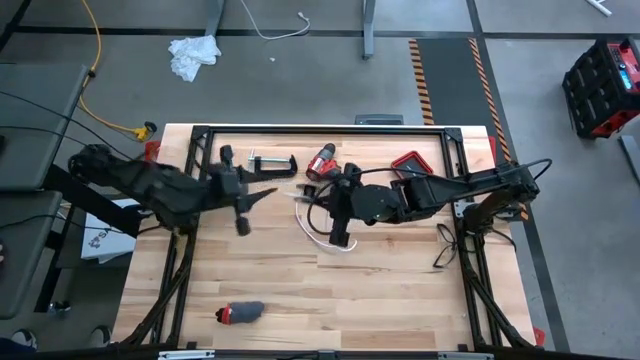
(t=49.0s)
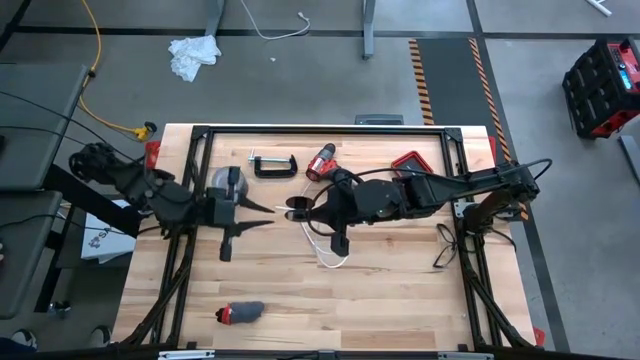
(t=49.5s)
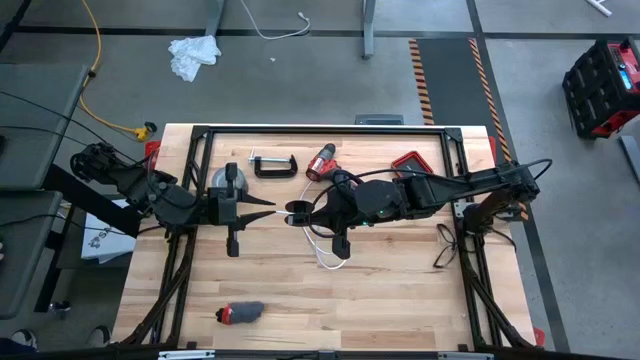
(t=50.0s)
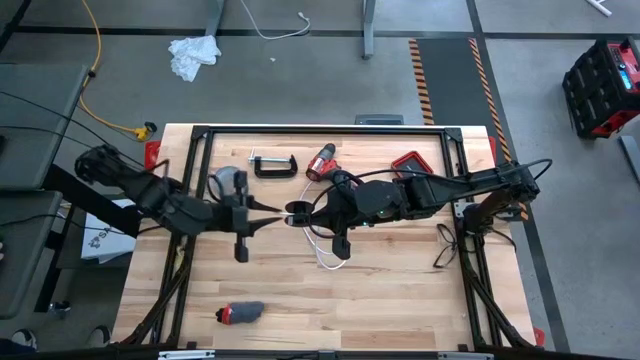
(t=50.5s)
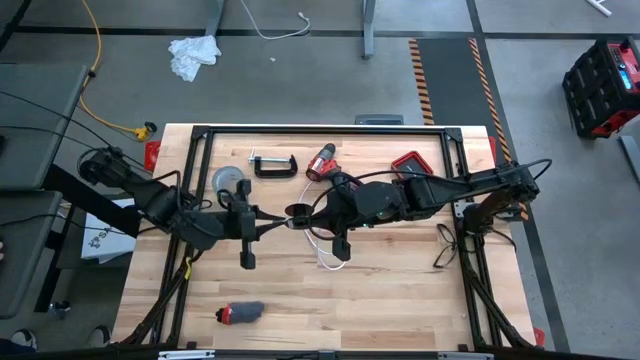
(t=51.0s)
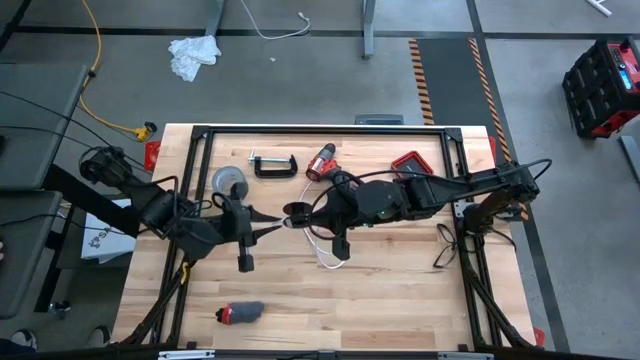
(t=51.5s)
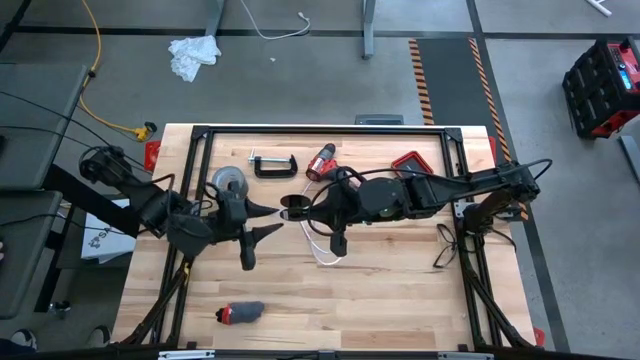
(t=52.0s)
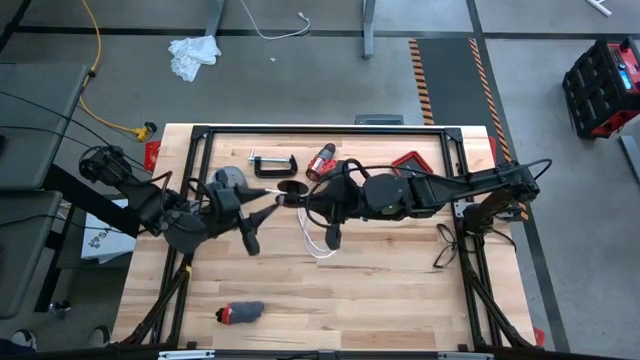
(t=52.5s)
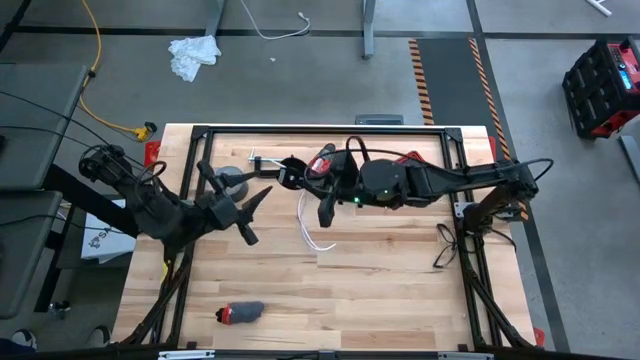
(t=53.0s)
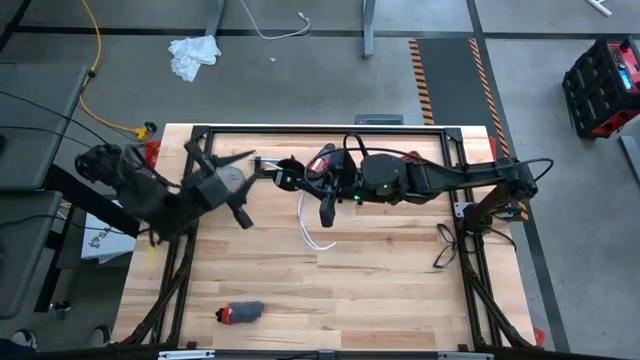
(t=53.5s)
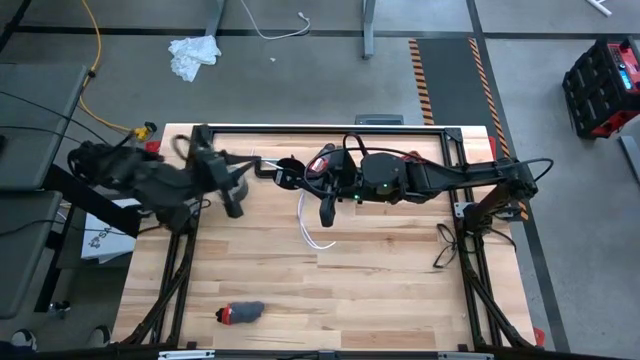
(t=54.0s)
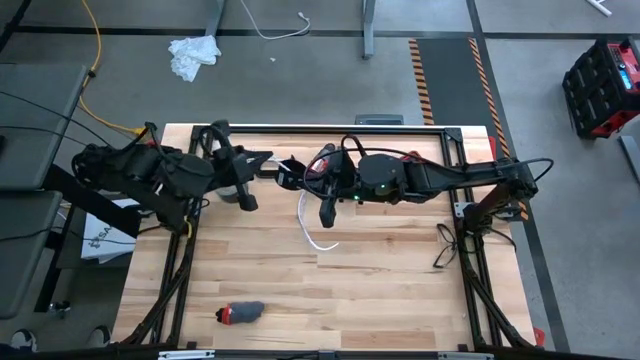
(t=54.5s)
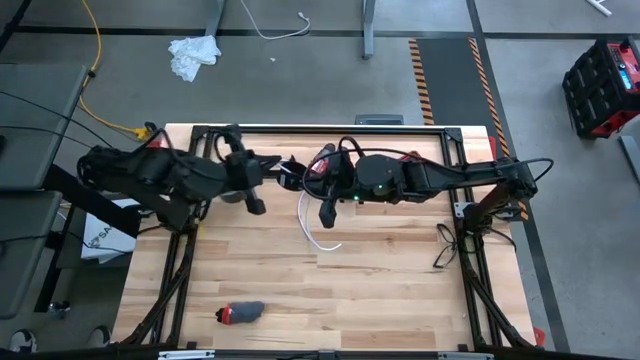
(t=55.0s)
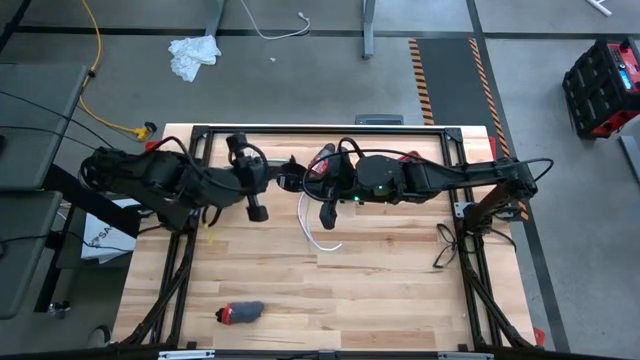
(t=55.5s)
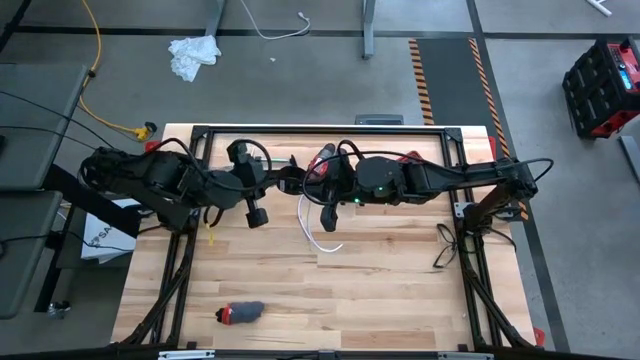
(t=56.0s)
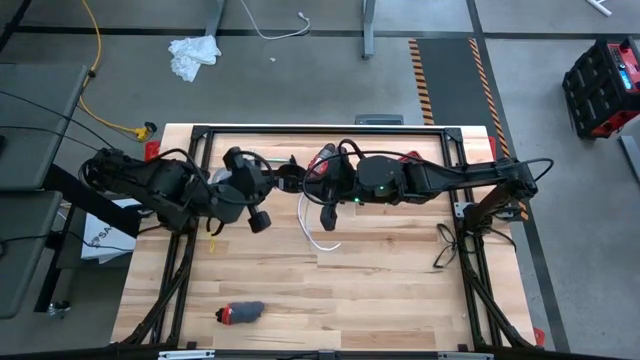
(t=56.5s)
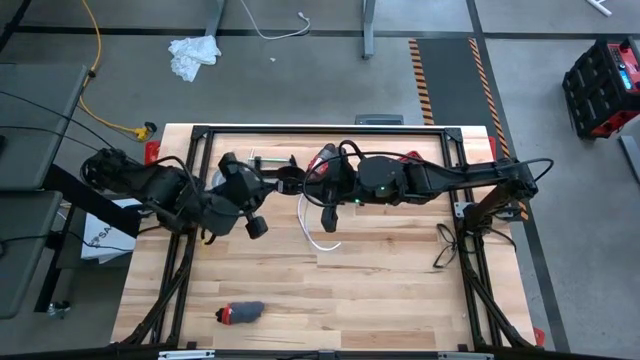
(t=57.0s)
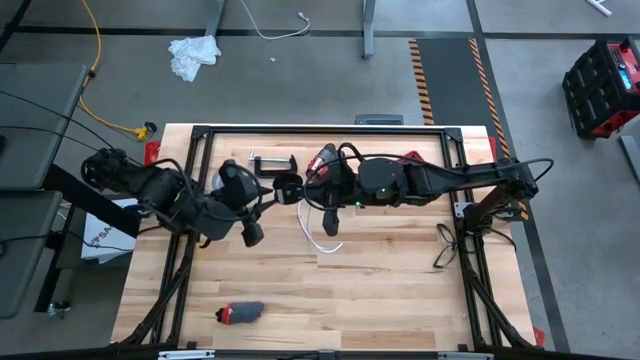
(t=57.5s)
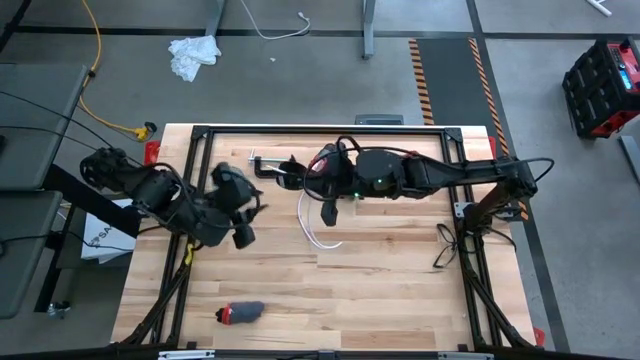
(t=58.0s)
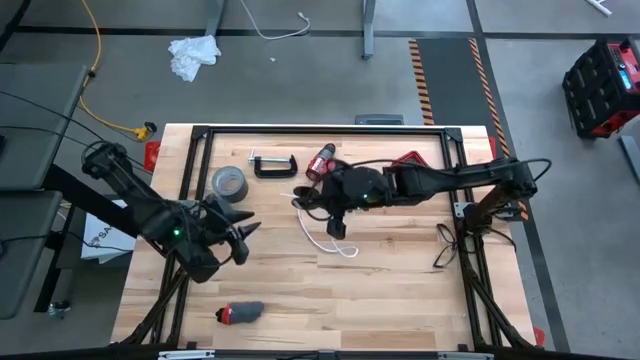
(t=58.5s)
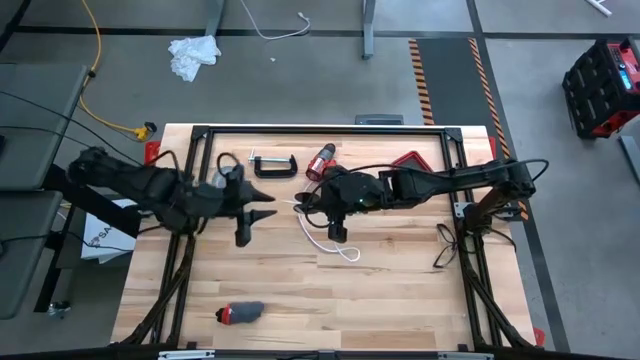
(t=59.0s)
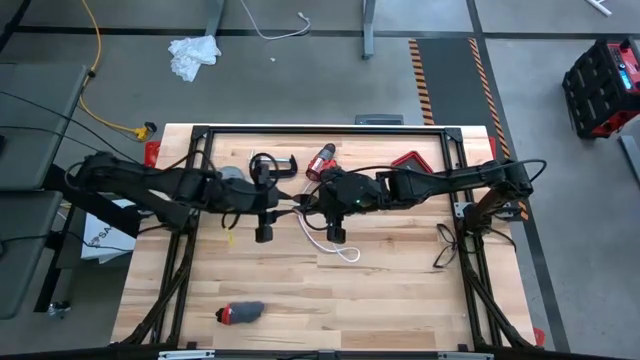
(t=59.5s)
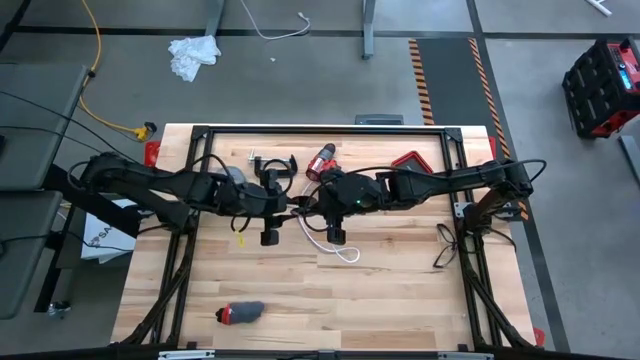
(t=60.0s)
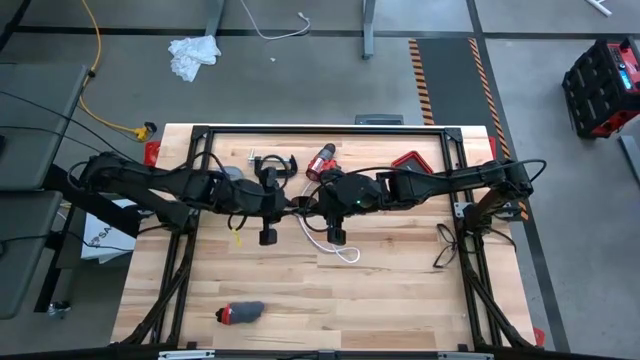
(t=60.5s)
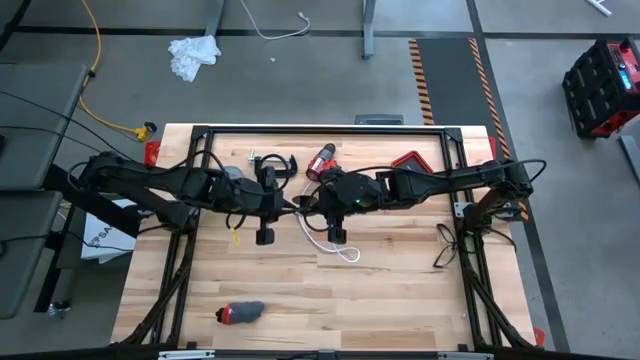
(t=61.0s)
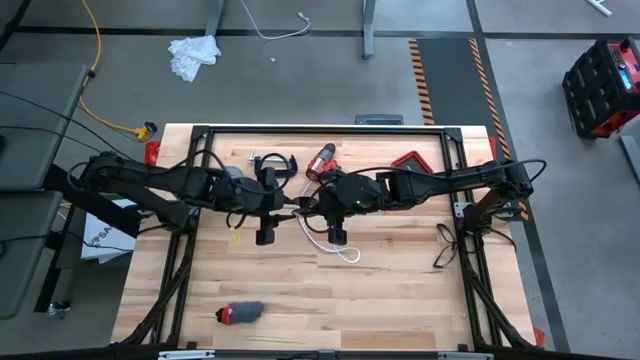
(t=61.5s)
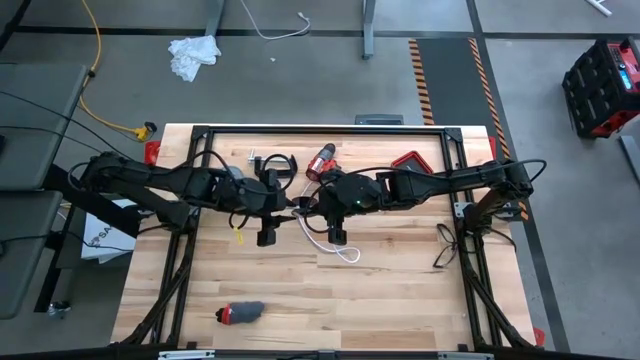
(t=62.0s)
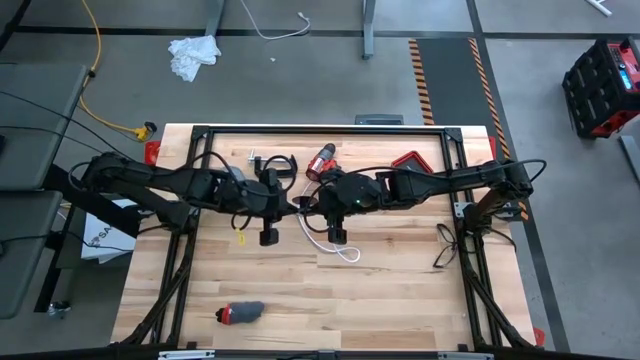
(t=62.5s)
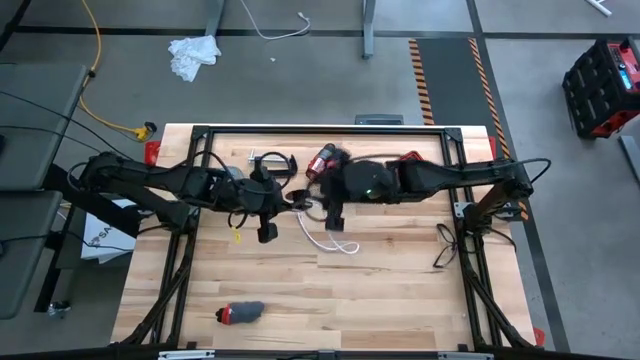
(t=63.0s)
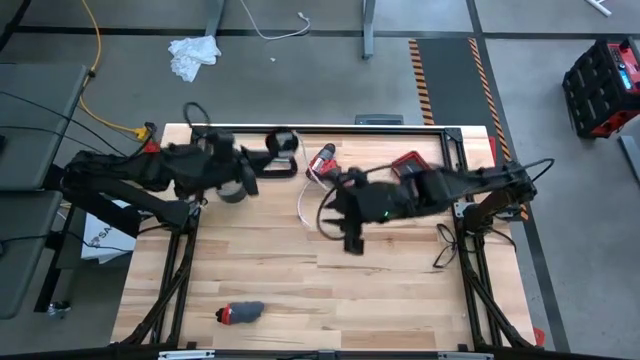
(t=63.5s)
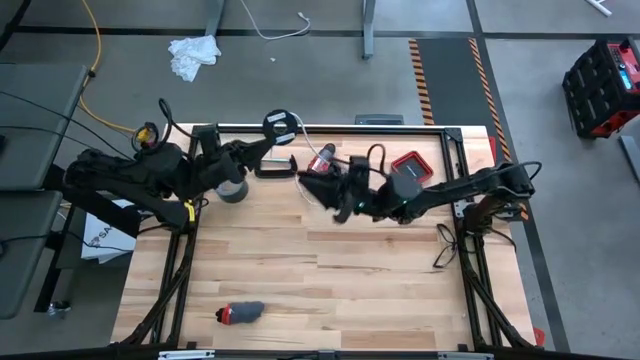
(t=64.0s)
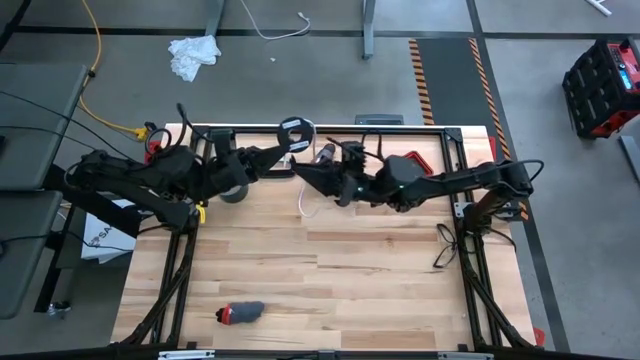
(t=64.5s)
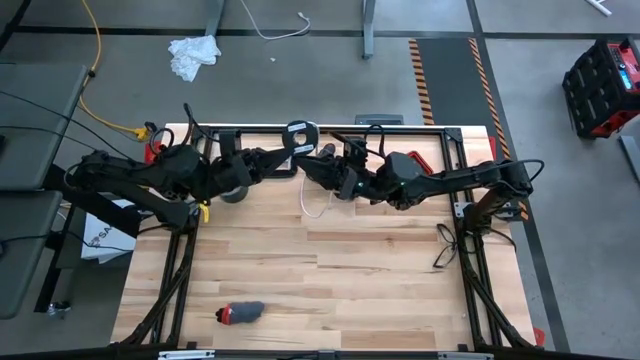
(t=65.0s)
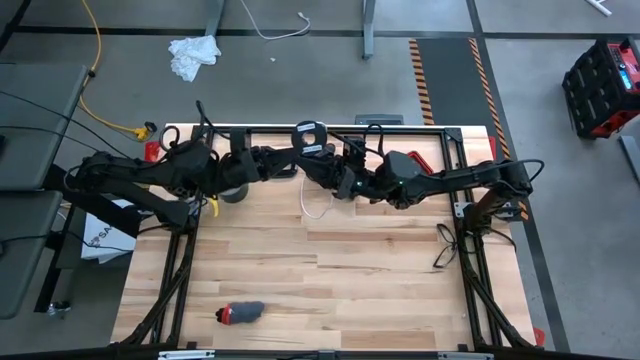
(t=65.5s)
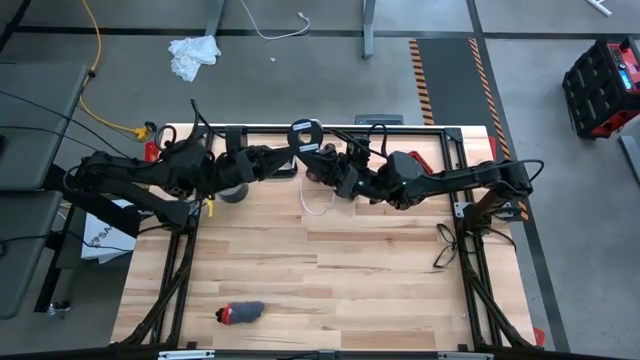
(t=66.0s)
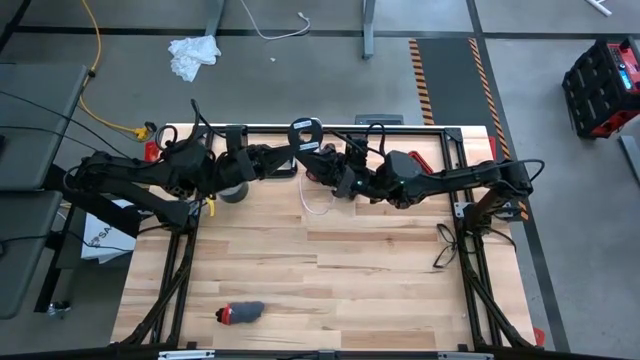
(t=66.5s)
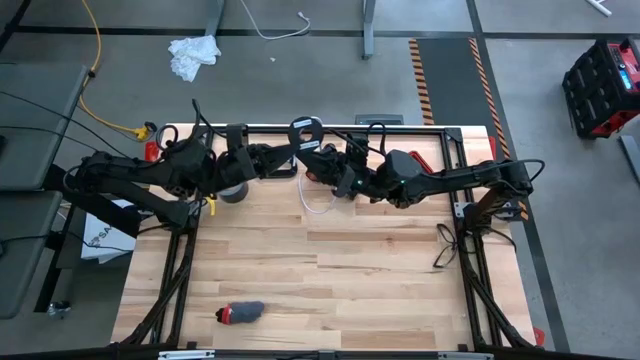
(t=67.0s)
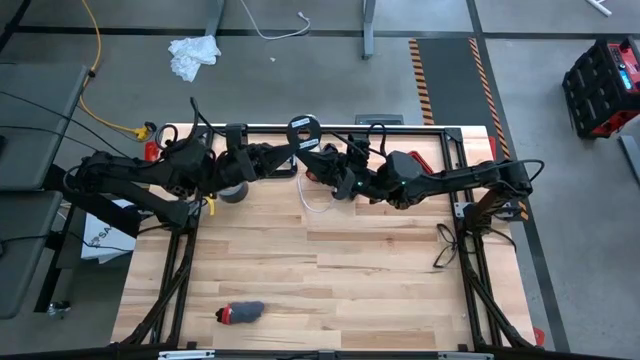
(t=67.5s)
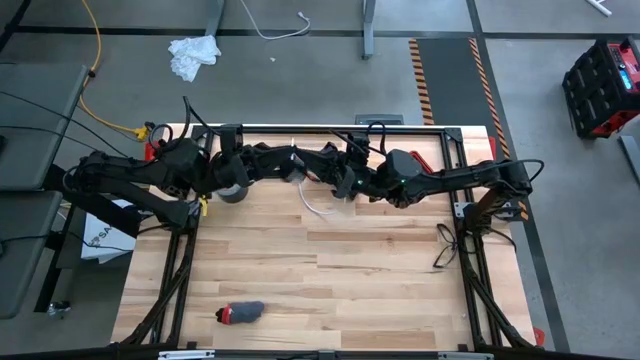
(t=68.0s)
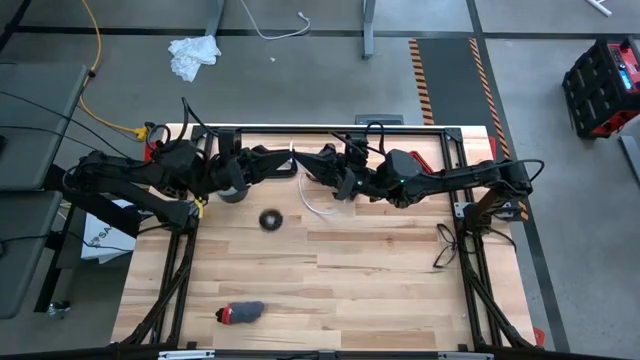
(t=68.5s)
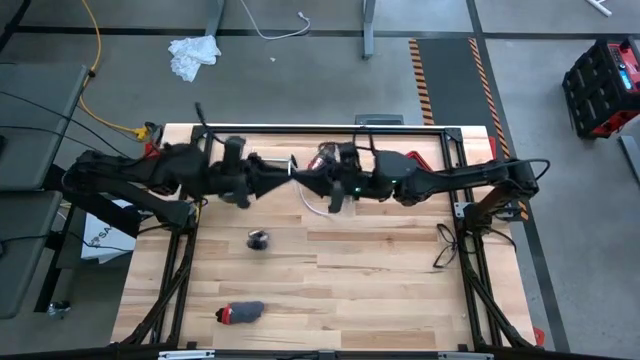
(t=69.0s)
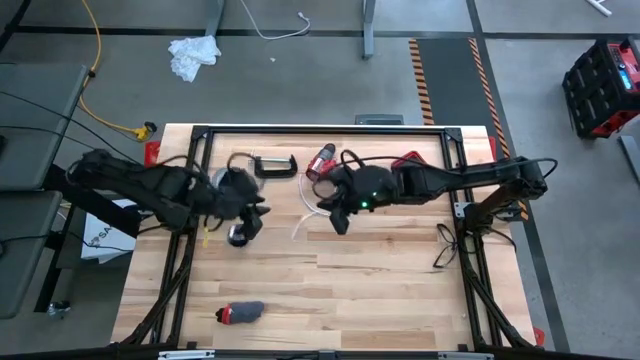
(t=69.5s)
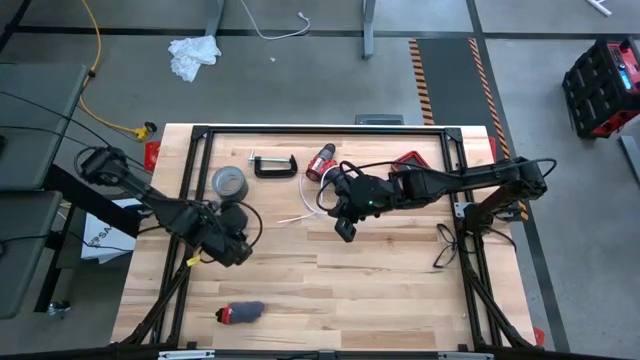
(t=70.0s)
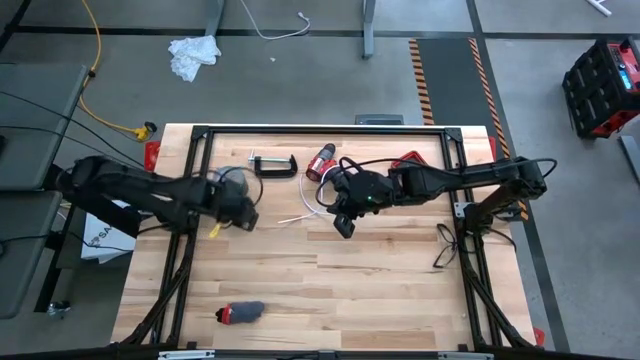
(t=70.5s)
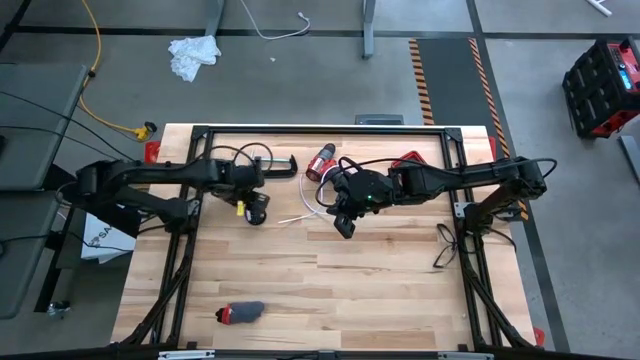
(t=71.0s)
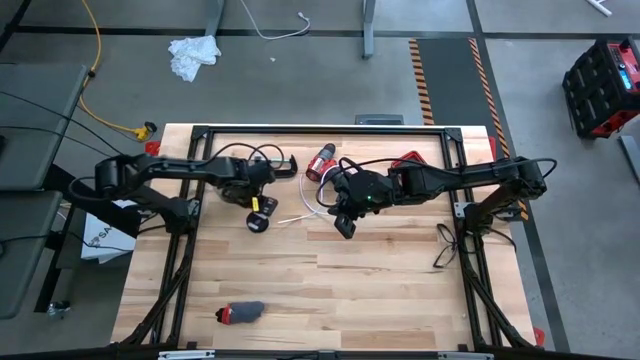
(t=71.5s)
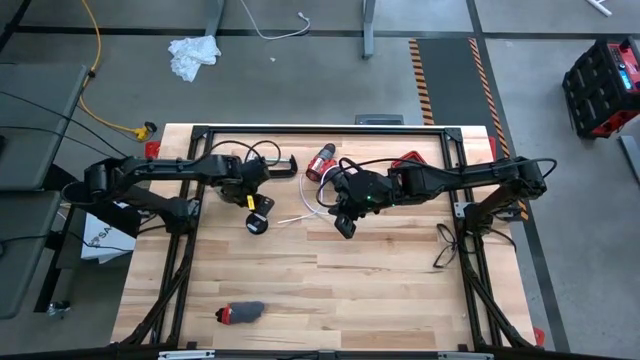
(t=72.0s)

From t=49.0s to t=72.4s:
Task: Coil cords
Coil the white cable wire into the black spool
